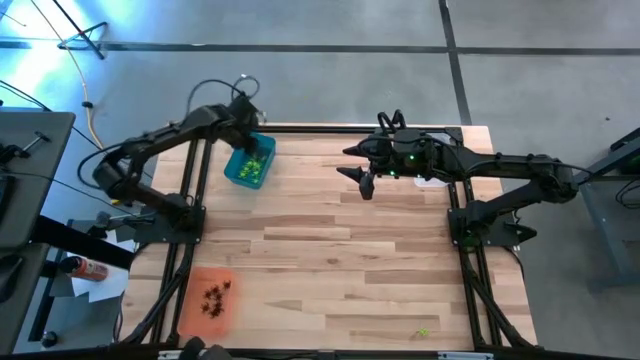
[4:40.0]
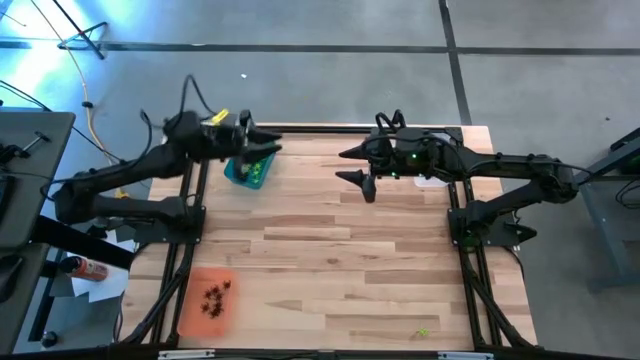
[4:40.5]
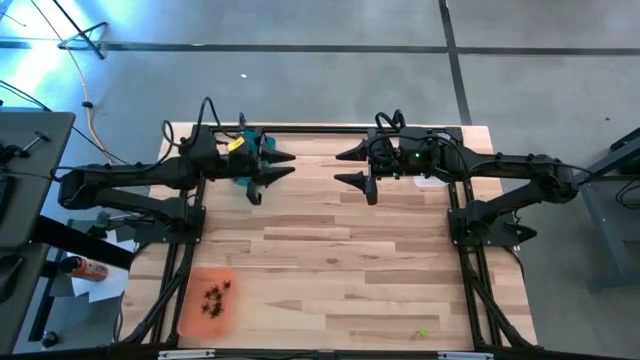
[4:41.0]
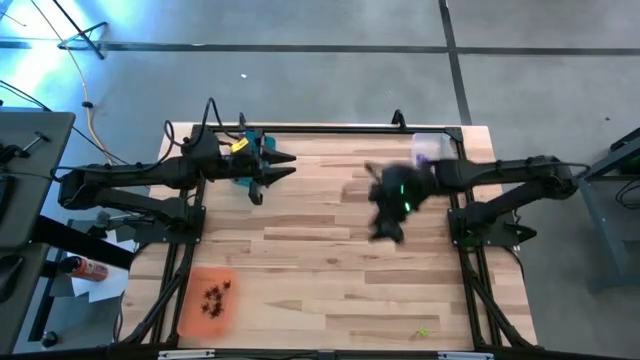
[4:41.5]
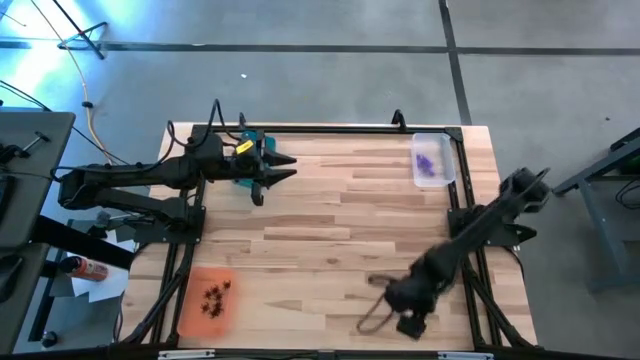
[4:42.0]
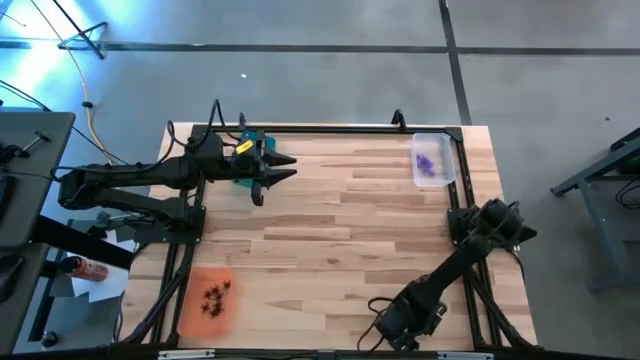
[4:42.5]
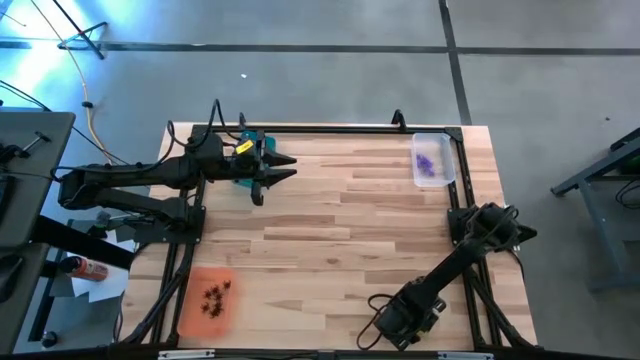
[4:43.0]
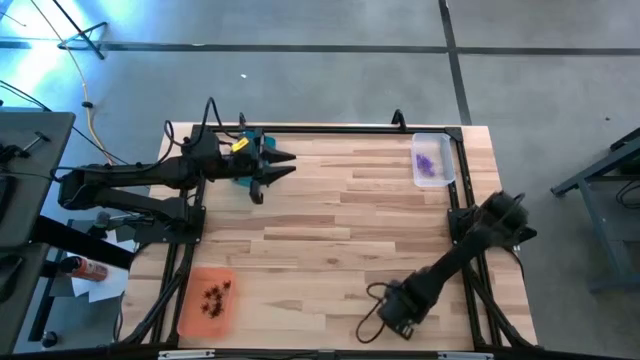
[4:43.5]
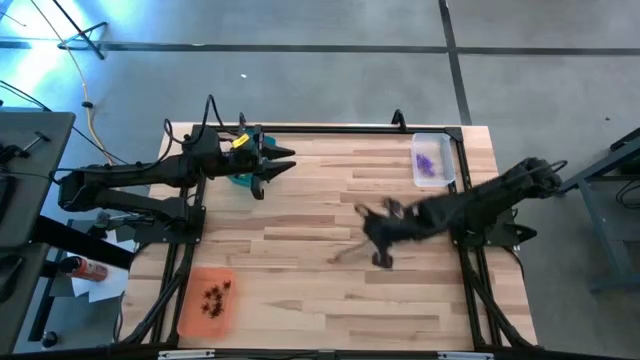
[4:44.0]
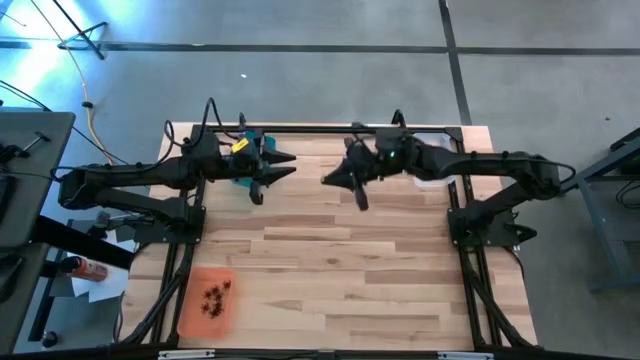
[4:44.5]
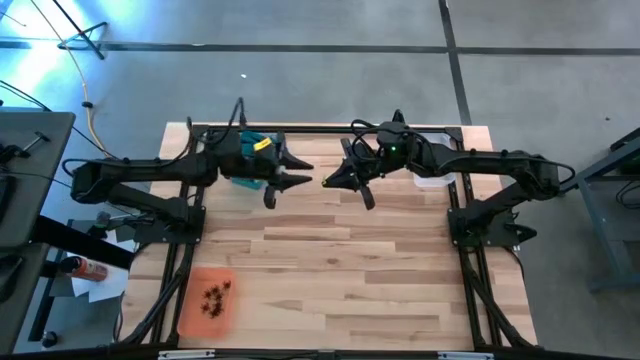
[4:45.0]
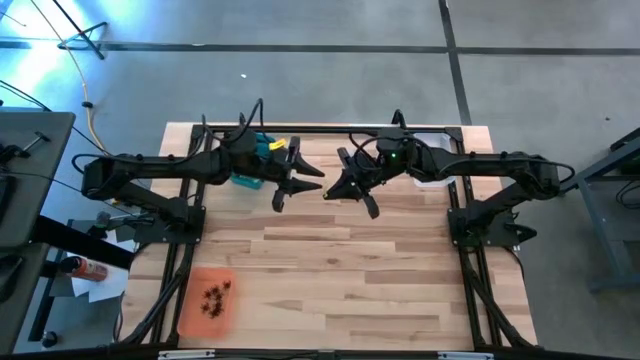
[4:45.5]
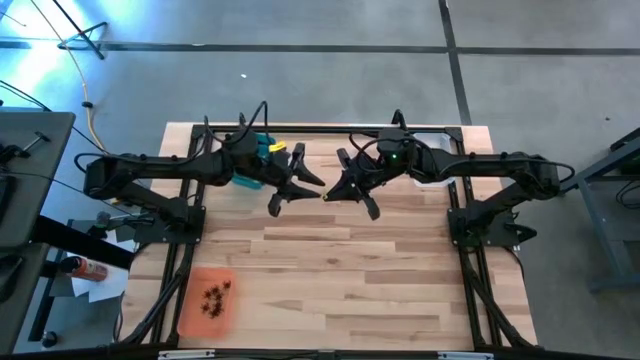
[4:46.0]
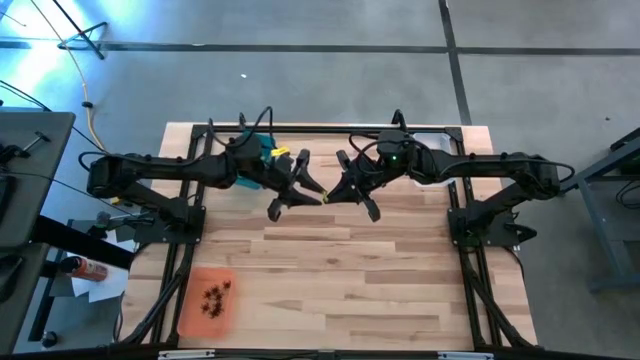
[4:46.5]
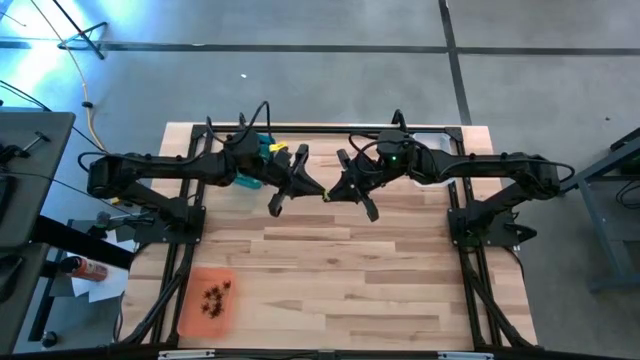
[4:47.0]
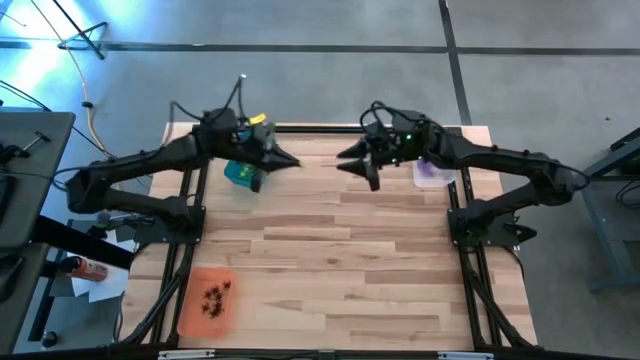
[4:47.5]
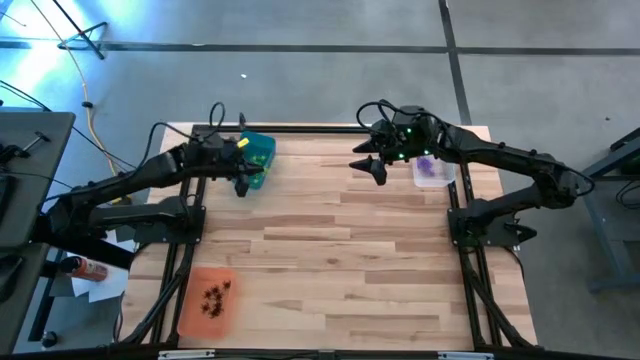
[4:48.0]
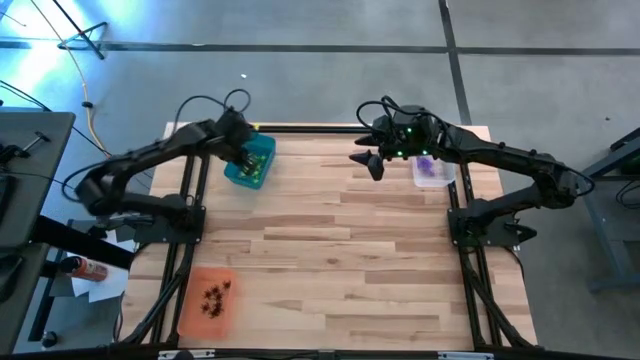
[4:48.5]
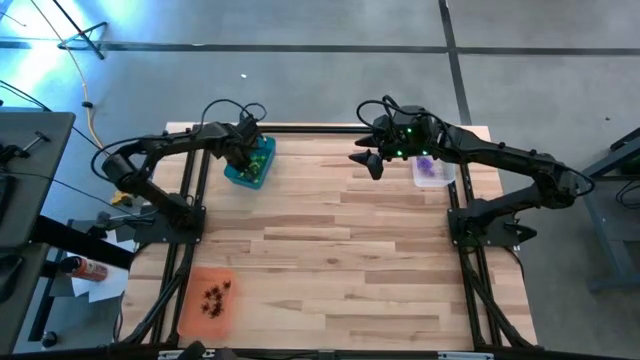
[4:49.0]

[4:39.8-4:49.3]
Task: Sort Halloween decoration
Put the green spider toy into the blue bin

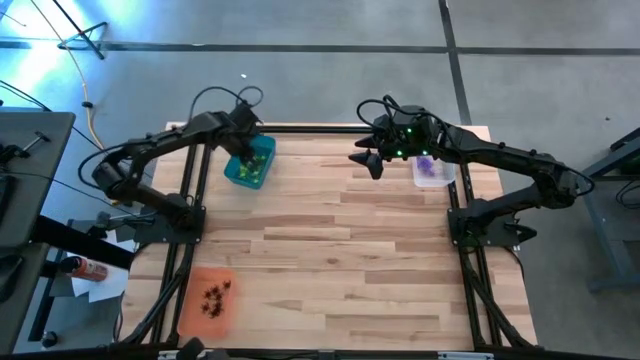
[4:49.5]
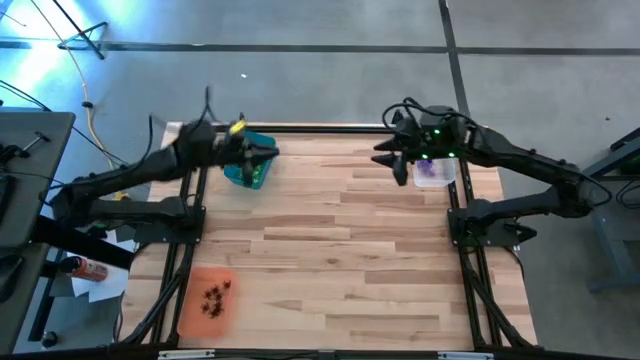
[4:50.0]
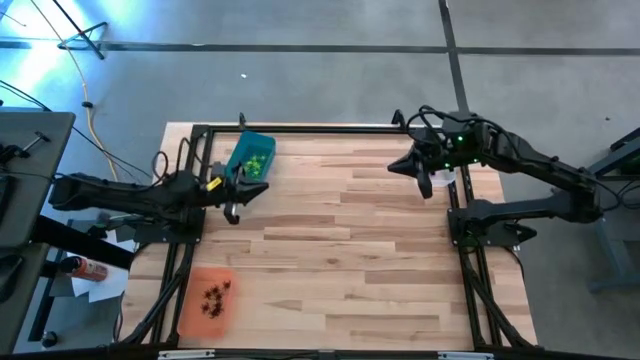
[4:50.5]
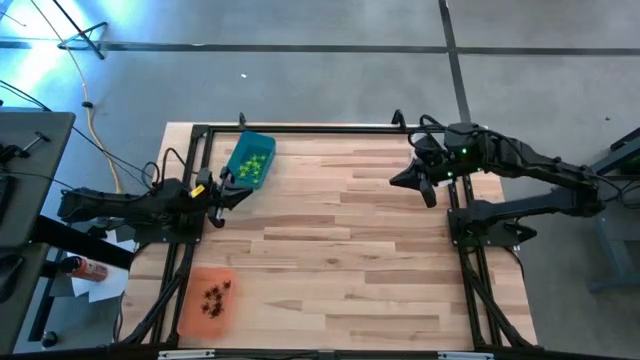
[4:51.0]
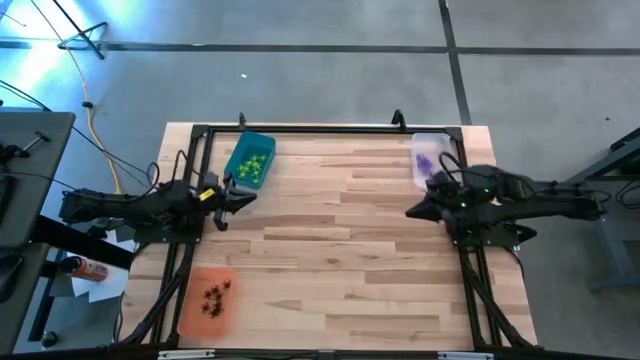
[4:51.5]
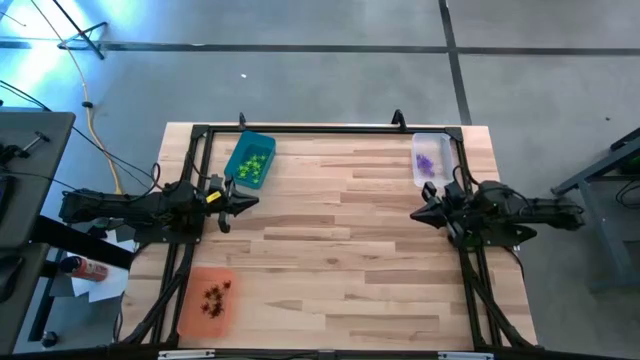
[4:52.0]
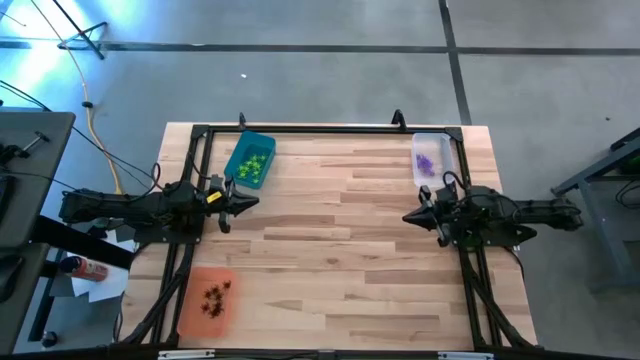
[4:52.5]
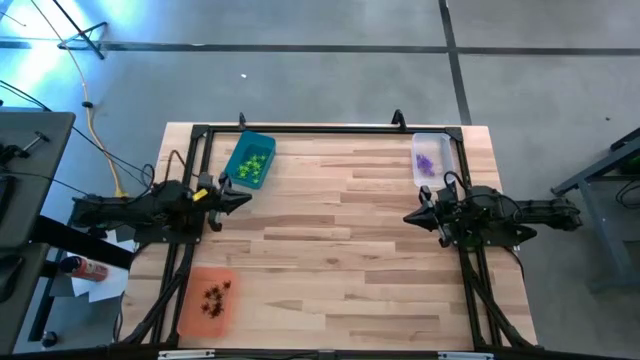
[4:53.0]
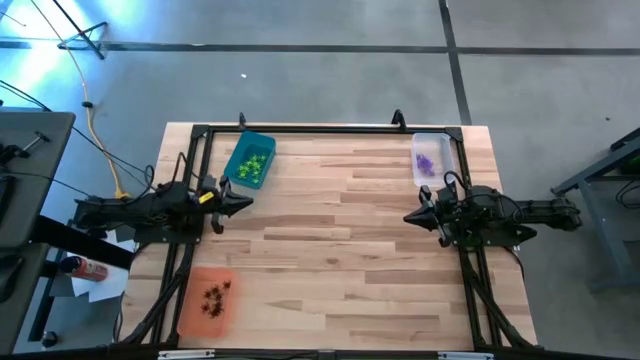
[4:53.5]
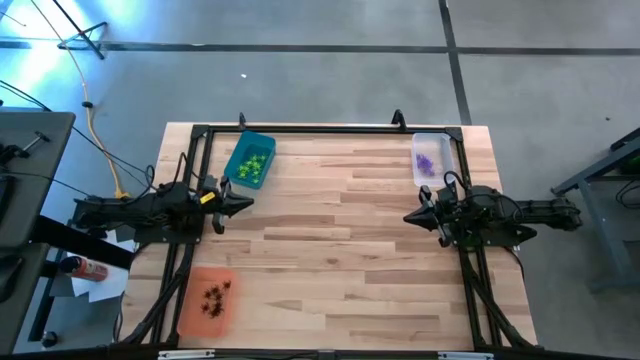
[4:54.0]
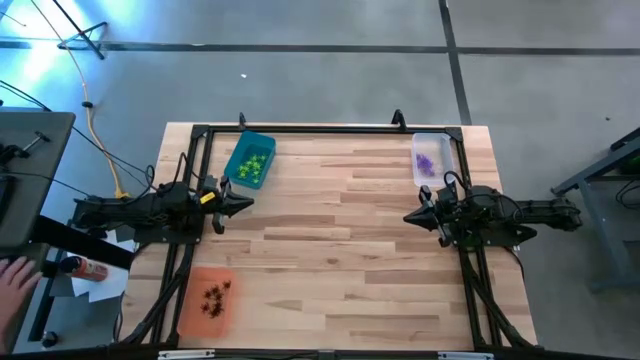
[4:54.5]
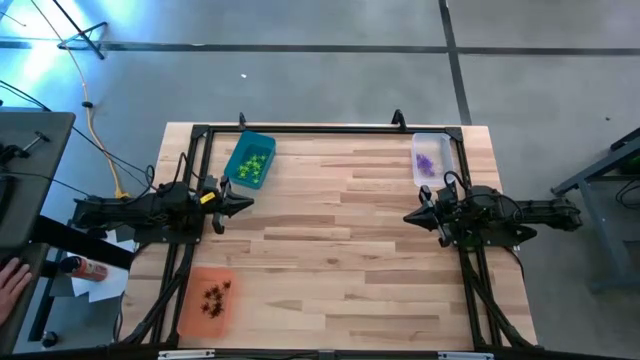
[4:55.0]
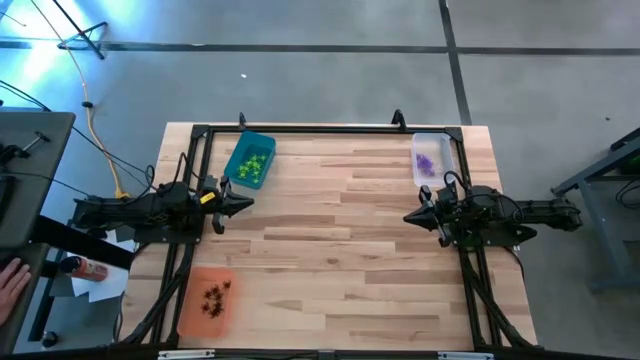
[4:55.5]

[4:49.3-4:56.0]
Return to Home Position

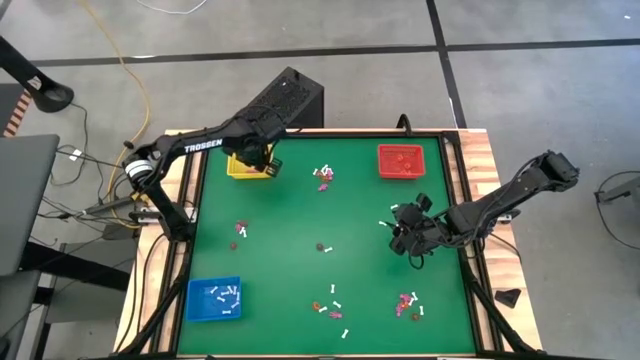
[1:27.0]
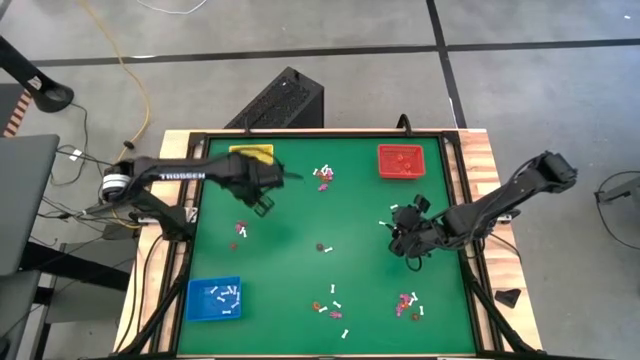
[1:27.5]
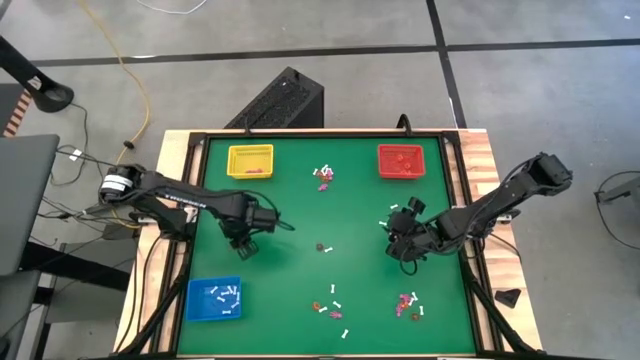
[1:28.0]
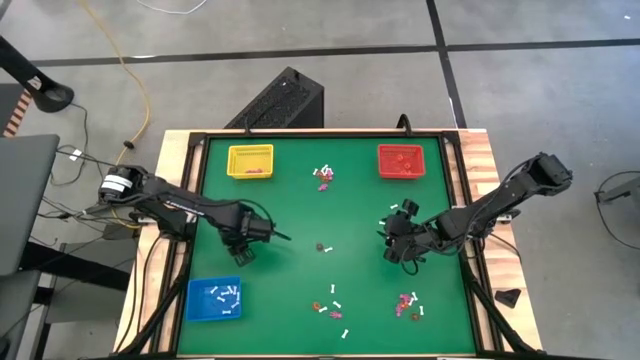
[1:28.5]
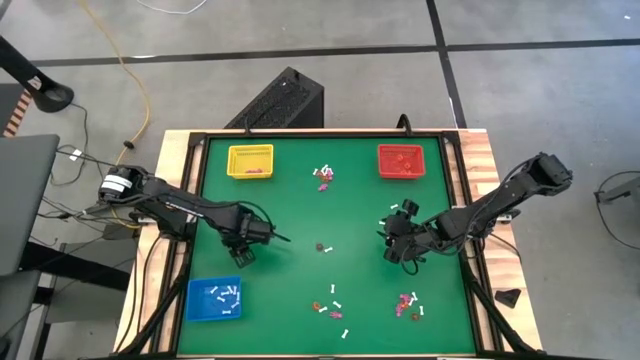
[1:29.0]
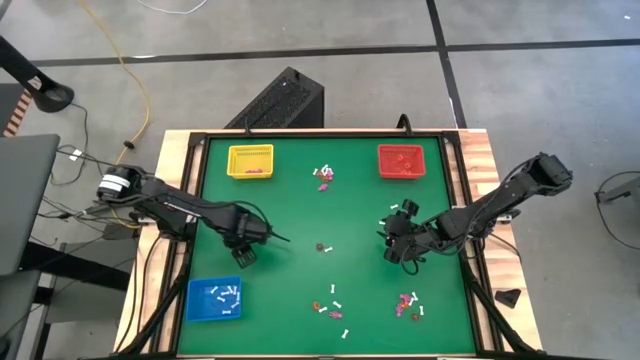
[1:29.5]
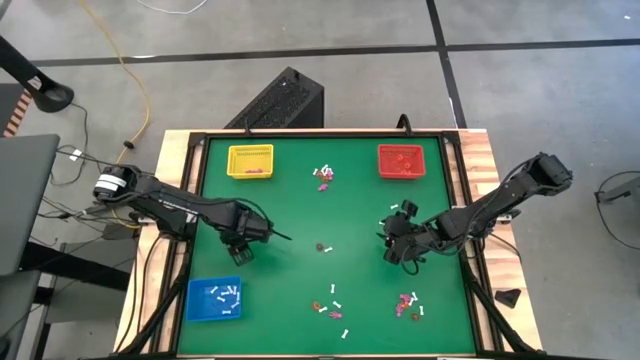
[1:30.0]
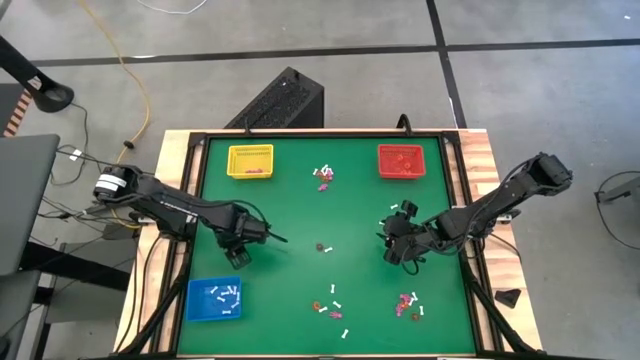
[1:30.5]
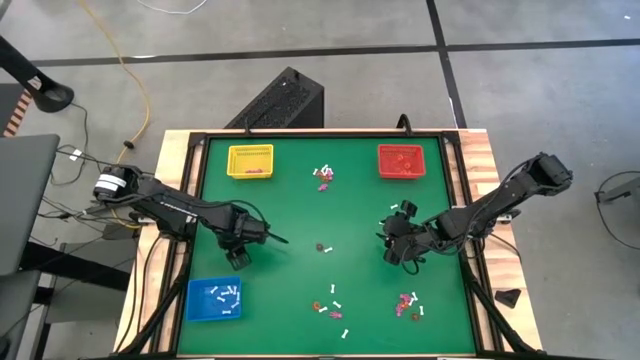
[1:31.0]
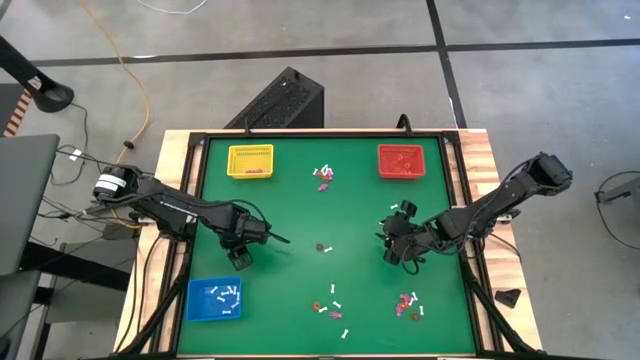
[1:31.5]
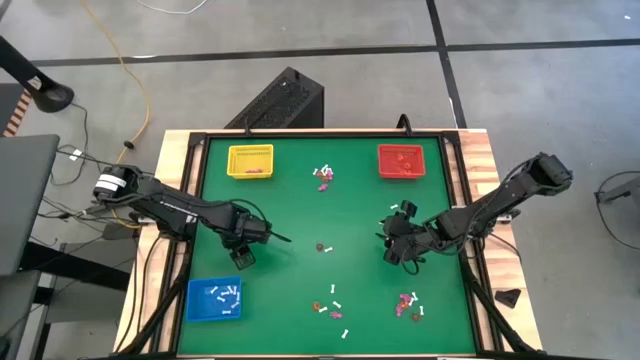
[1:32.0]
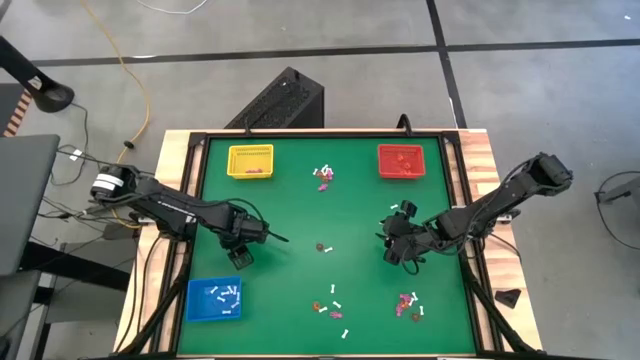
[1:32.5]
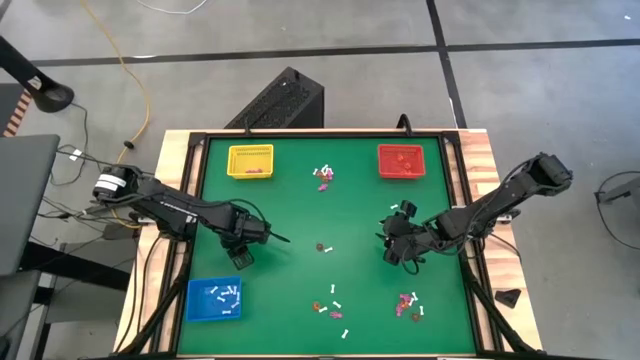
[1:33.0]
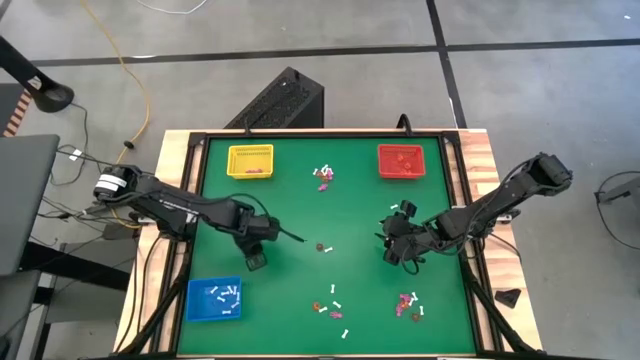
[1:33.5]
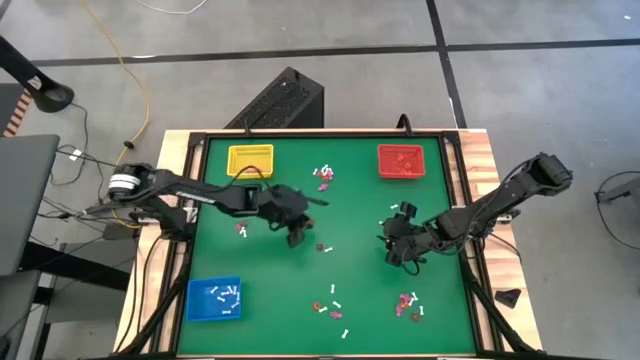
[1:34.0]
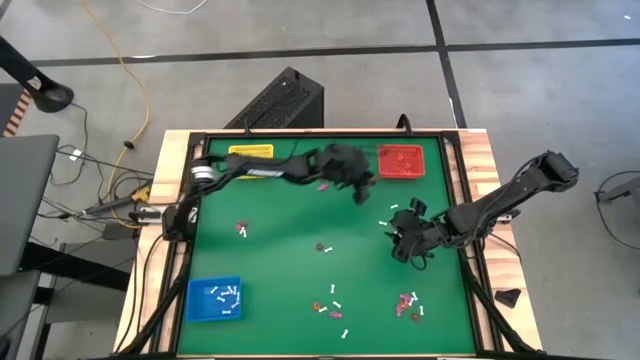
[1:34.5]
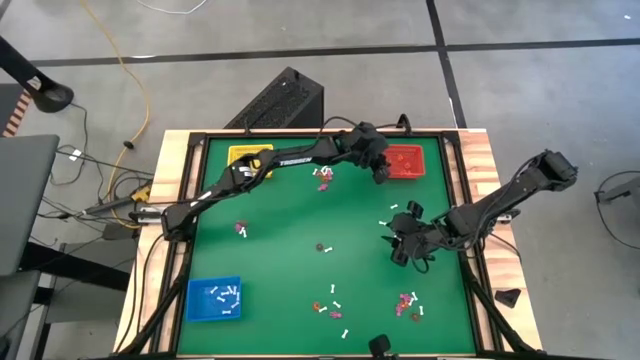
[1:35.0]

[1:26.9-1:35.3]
Task: Sort Halloween decoration
Put the pumpkin toy into the orange bin
